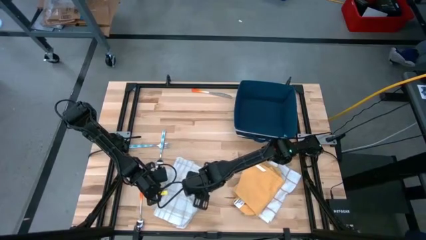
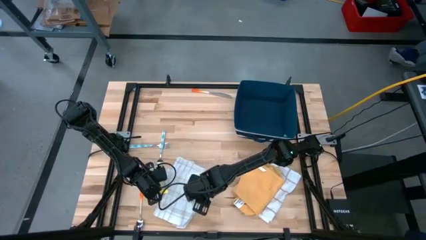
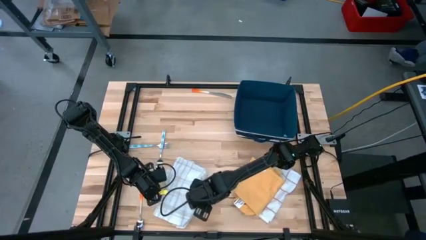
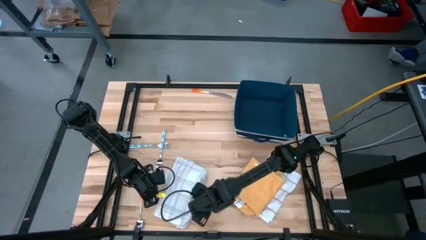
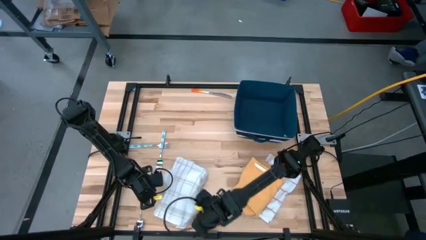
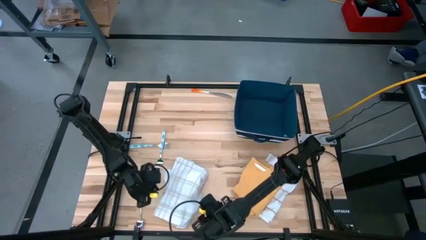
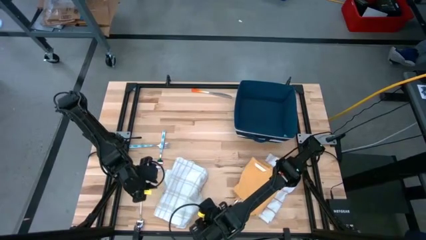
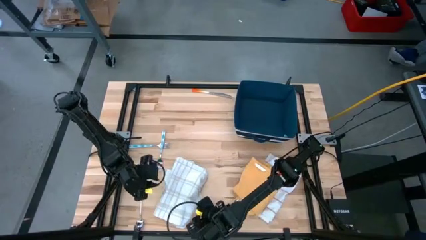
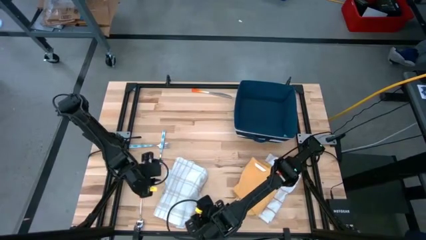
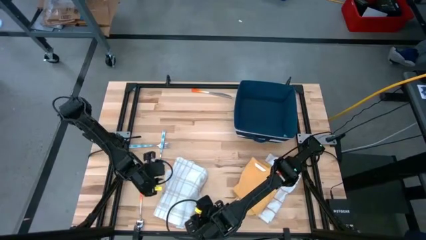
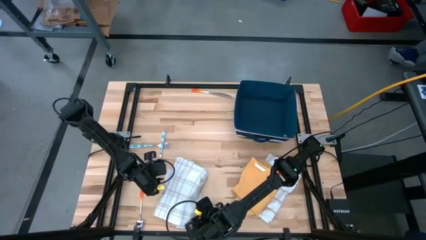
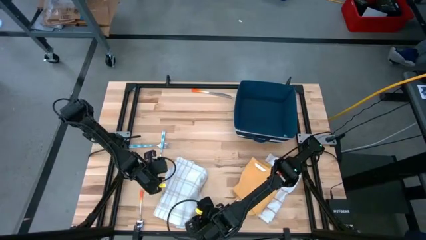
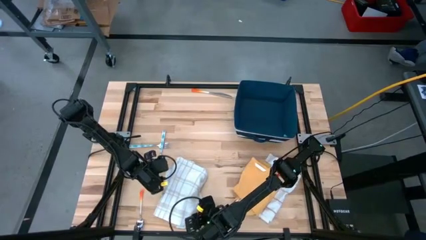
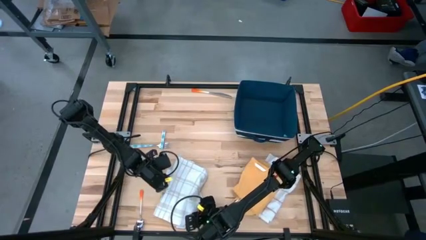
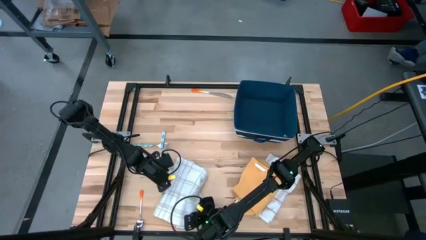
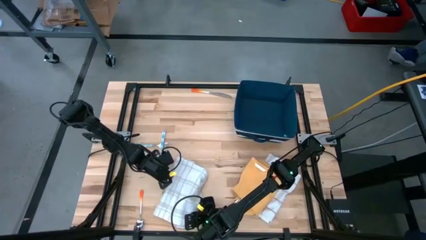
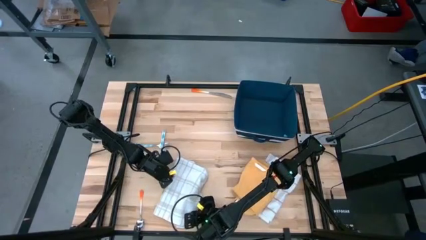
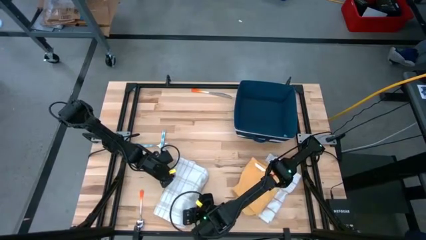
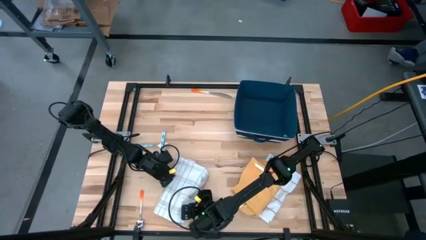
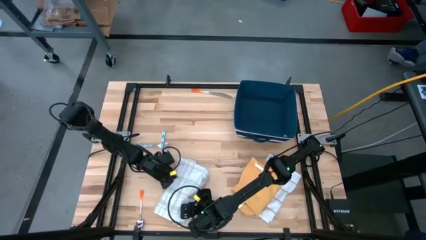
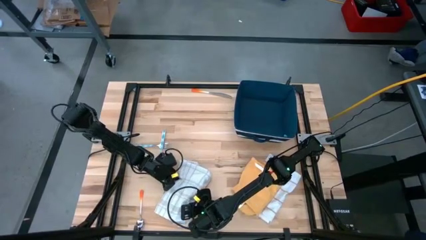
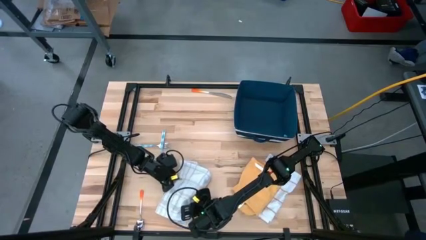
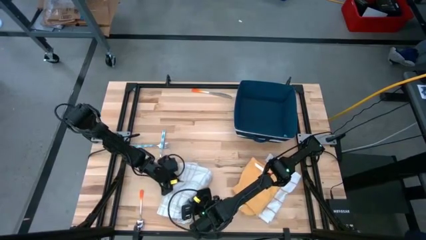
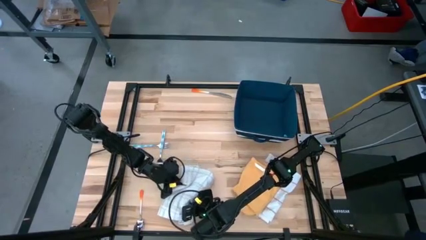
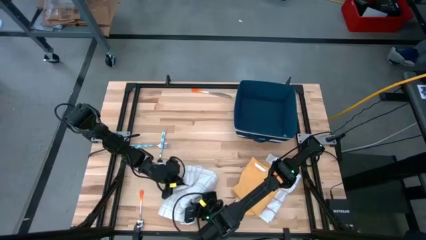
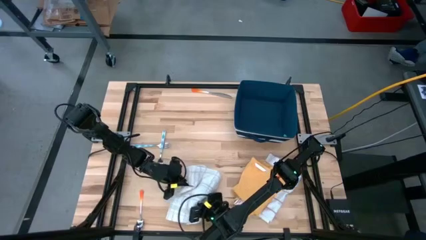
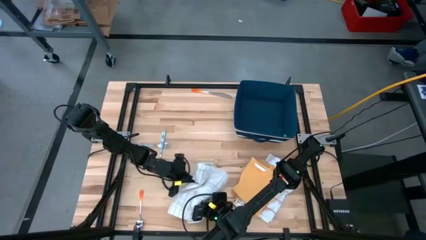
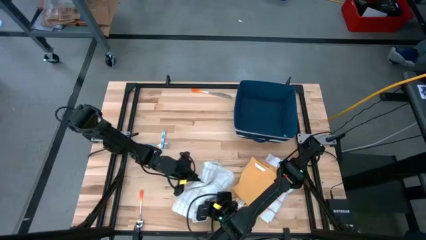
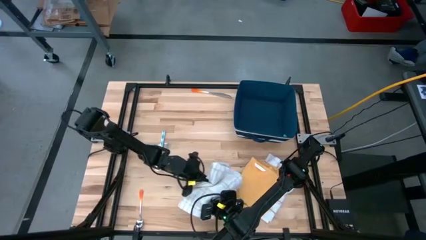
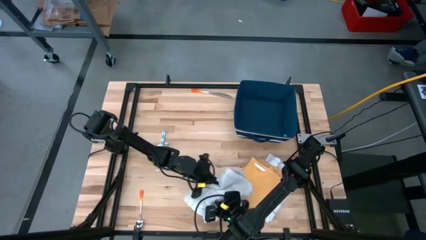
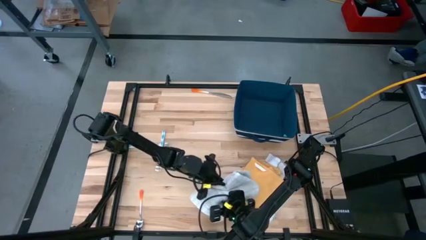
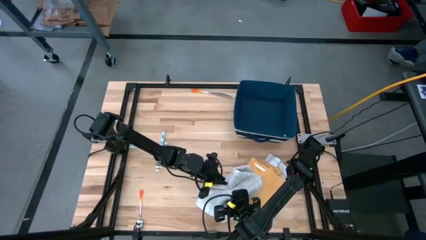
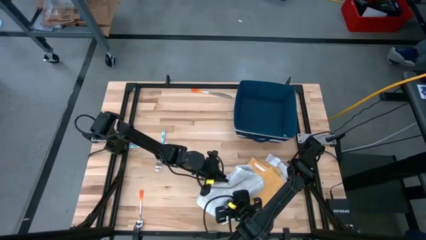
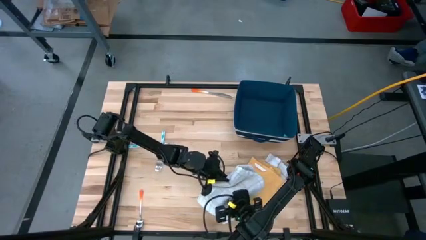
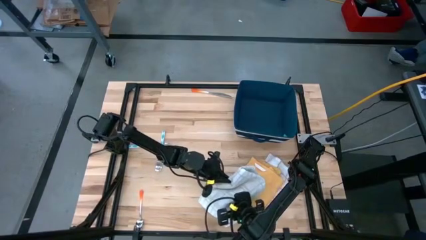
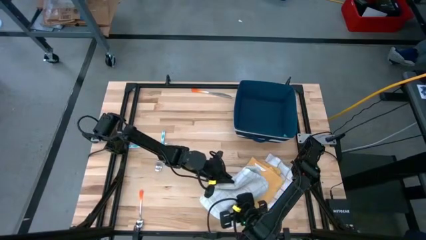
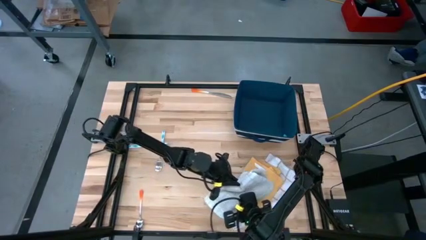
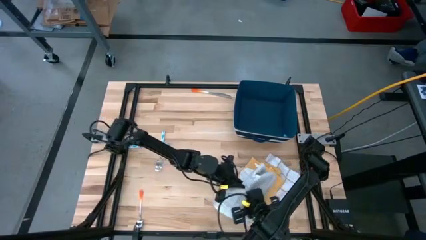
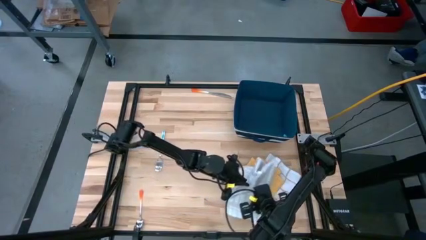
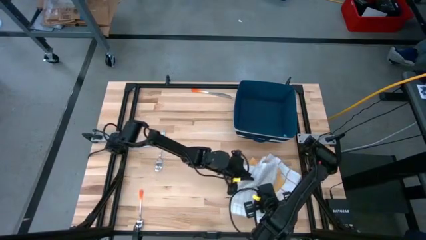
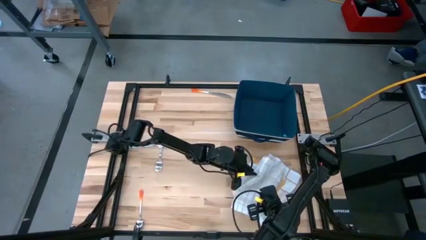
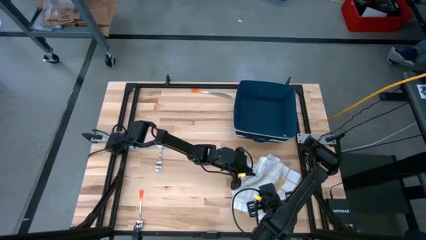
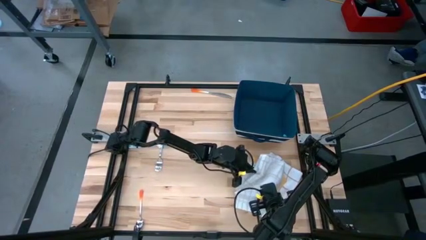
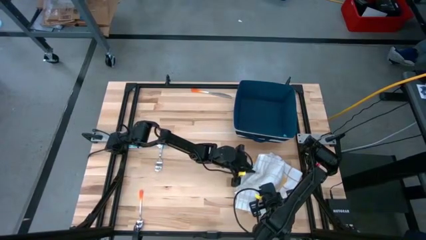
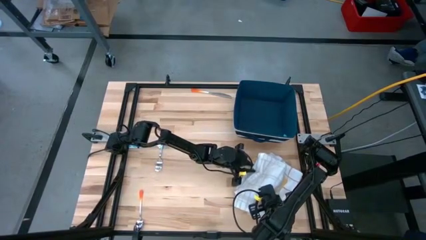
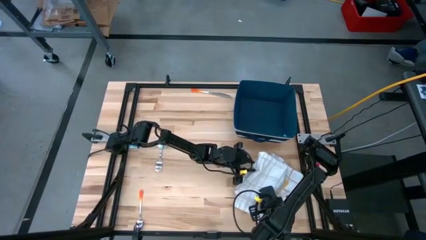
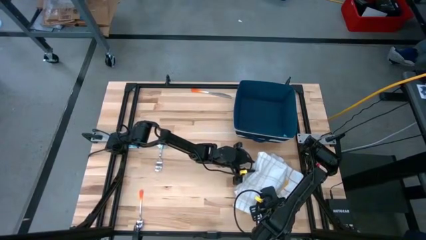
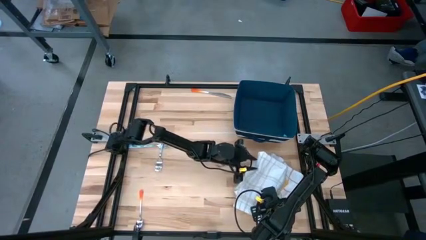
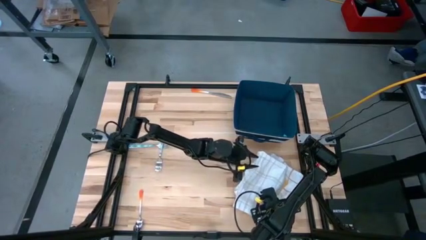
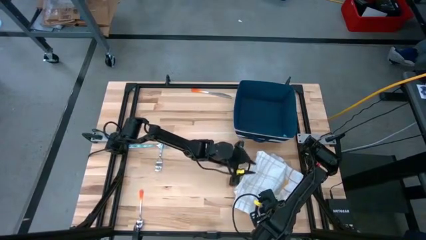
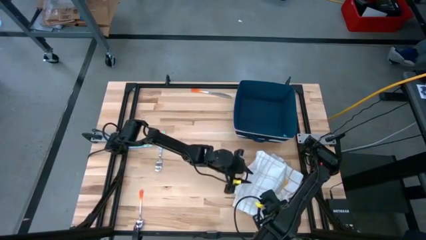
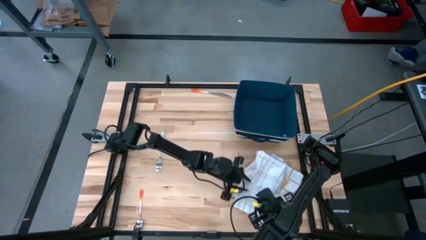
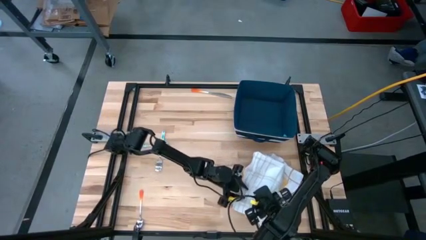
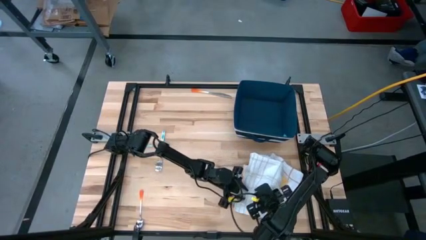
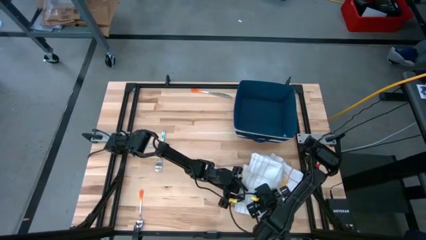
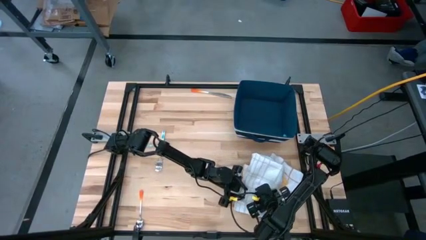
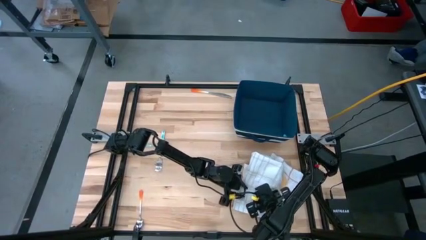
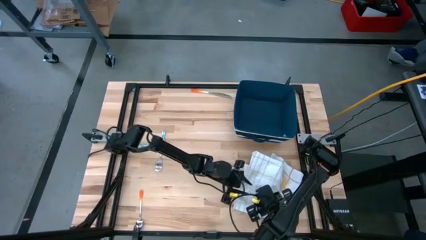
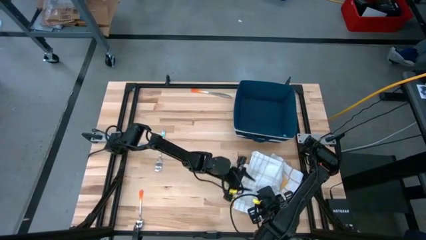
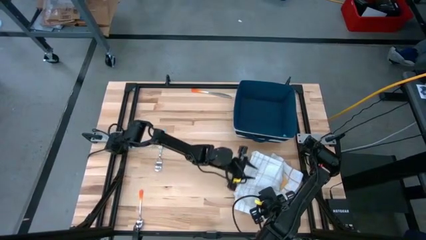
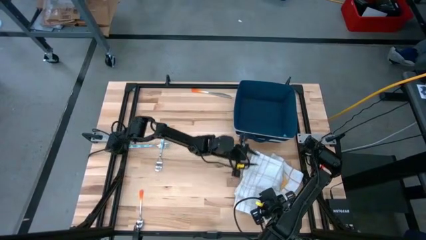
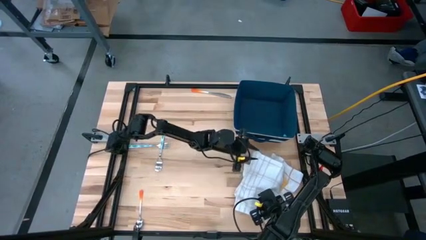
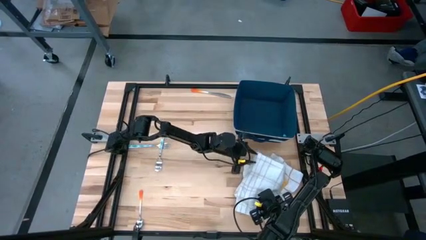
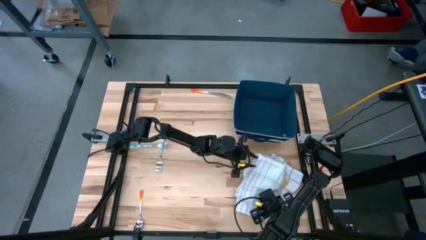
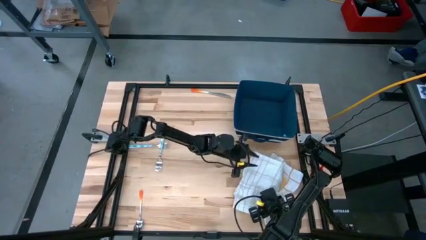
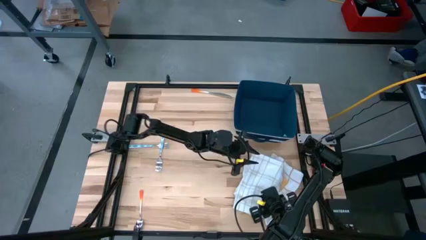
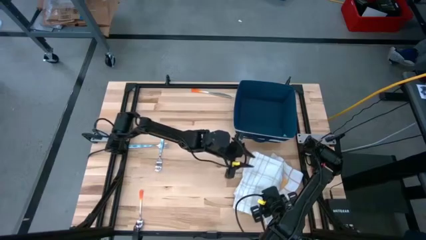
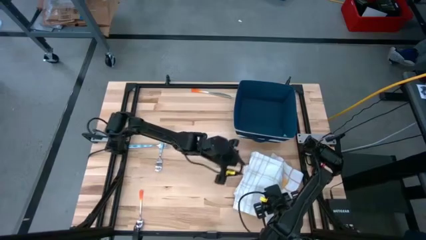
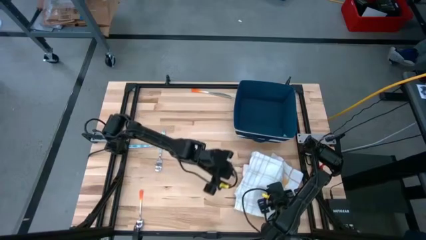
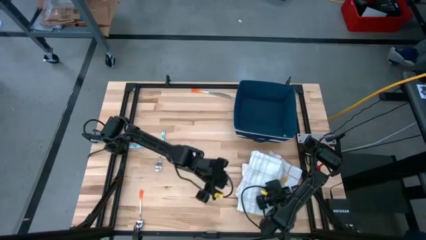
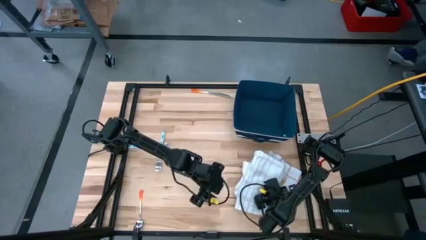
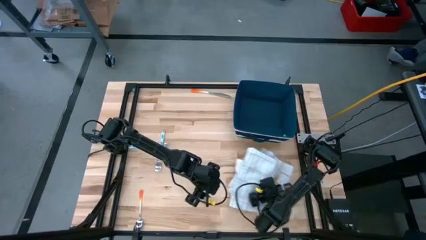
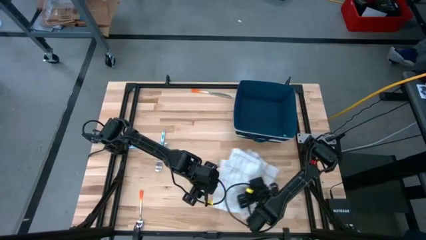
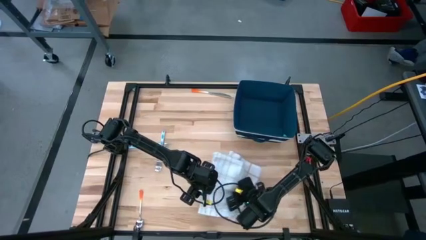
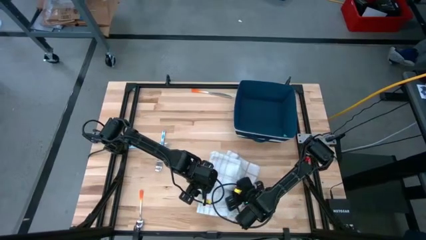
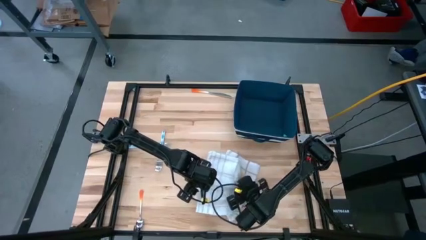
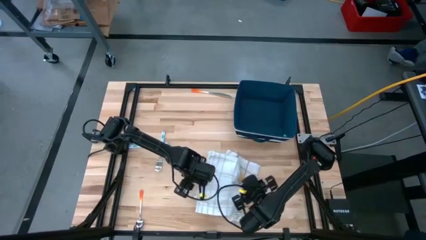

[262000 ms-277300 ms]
Task: Fold towel
Stack the white-and-gray checkered towel on top of the yellow towel

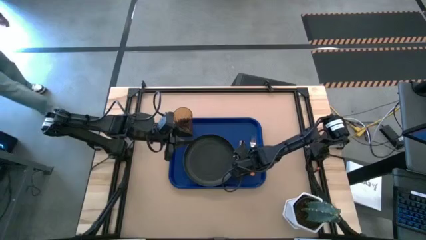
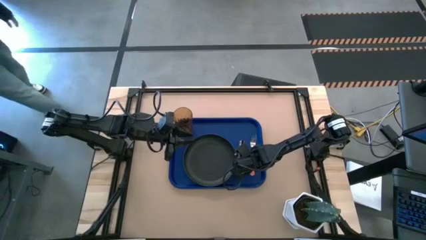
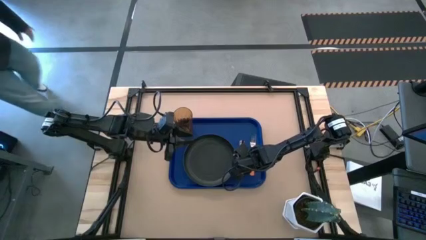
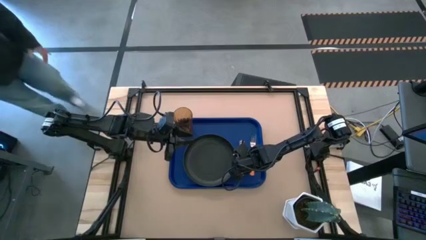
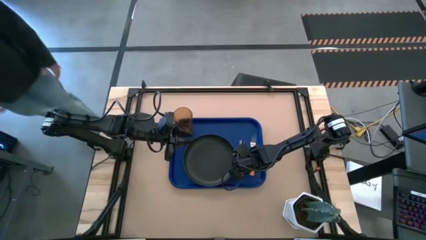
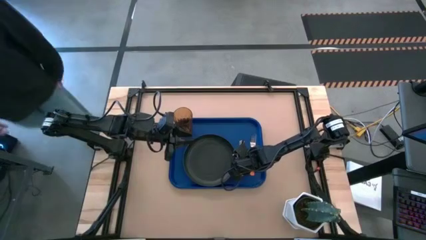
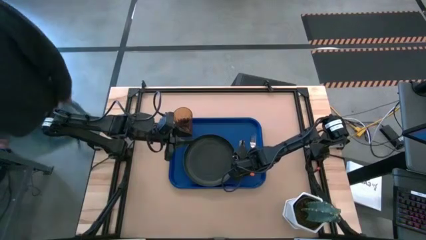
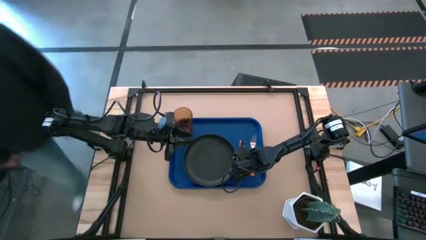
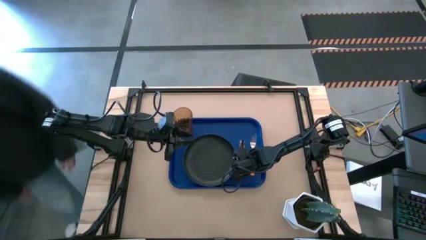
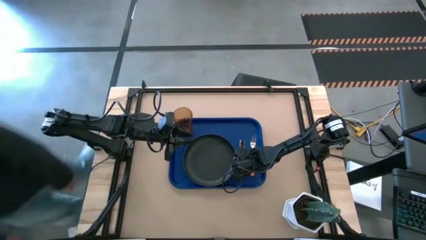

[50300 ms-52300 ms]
Task: Pick and place plate/cup/fork/spoon on tray
Adjust the spoon on the blue tray
